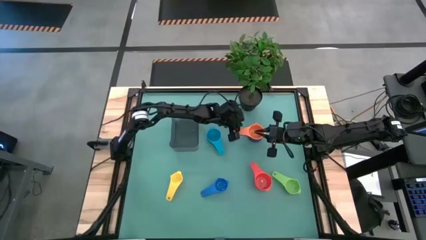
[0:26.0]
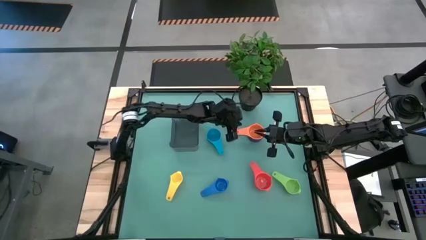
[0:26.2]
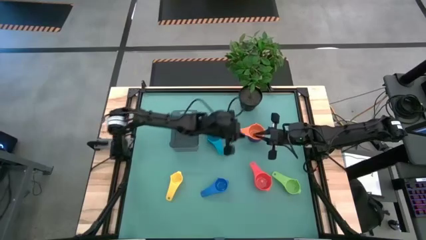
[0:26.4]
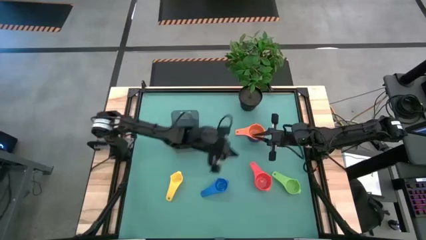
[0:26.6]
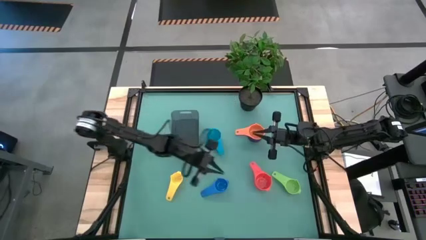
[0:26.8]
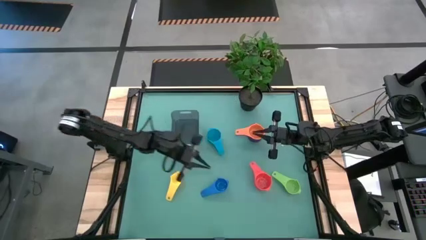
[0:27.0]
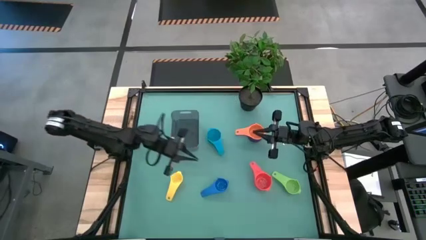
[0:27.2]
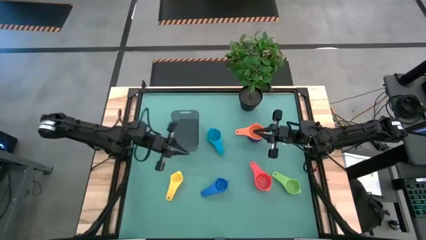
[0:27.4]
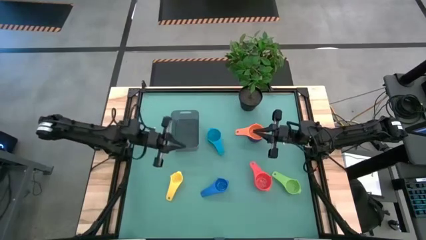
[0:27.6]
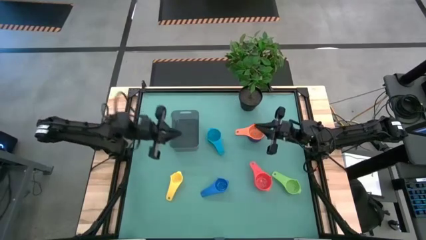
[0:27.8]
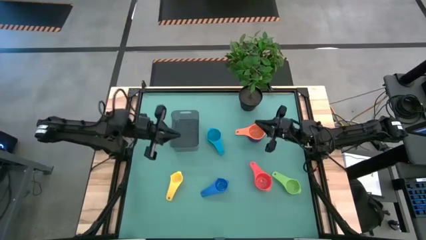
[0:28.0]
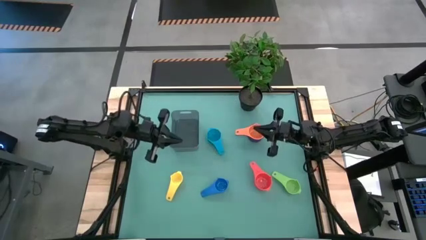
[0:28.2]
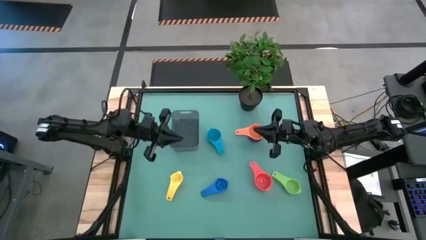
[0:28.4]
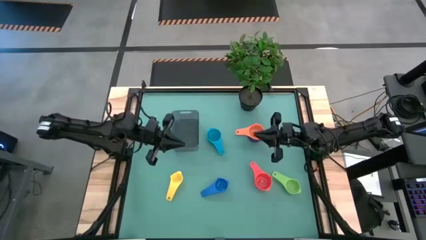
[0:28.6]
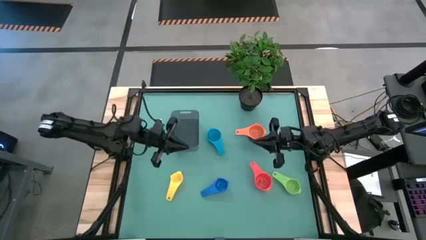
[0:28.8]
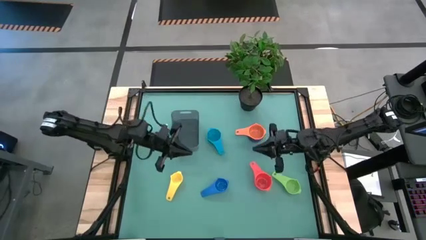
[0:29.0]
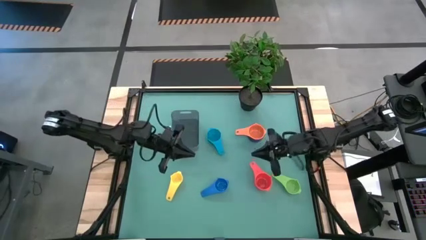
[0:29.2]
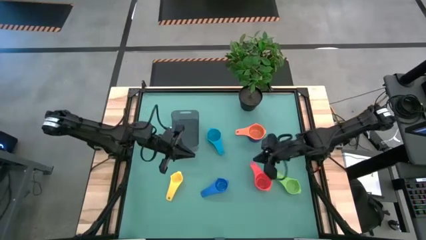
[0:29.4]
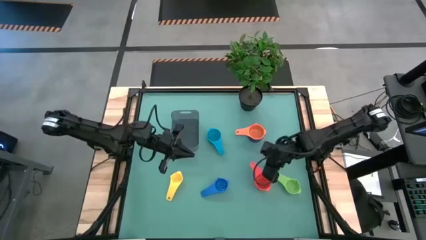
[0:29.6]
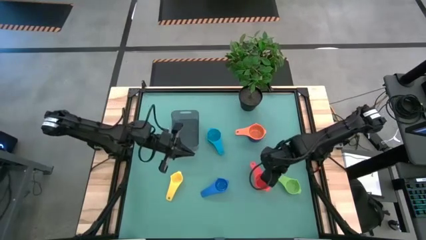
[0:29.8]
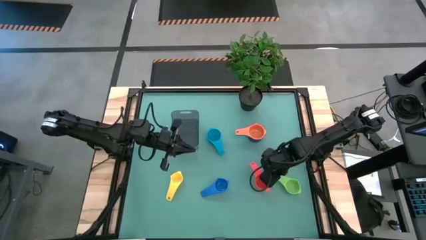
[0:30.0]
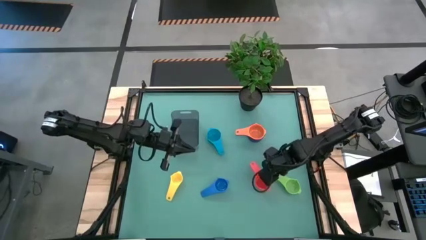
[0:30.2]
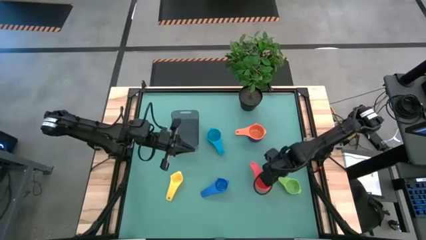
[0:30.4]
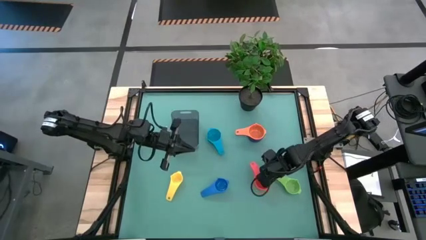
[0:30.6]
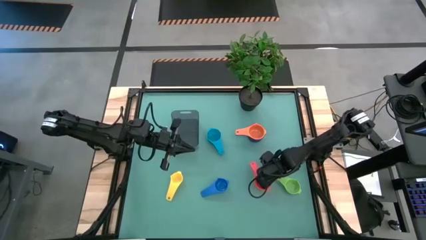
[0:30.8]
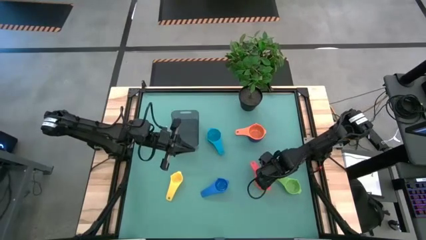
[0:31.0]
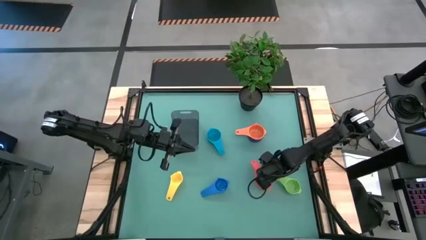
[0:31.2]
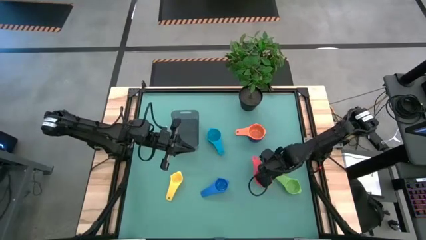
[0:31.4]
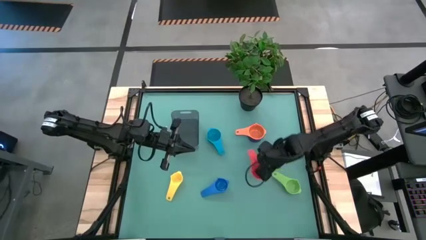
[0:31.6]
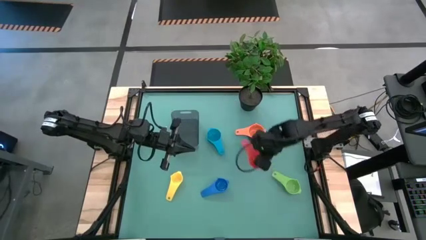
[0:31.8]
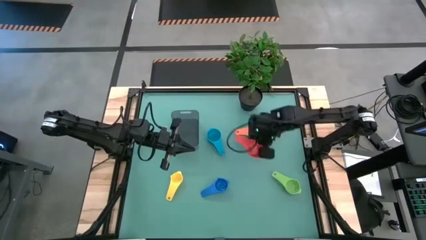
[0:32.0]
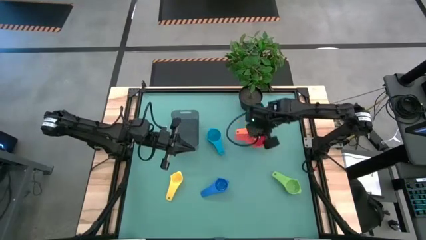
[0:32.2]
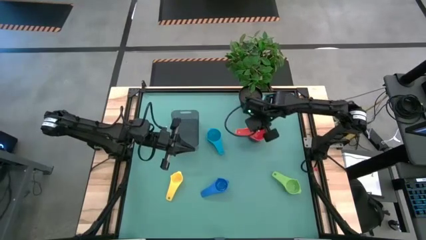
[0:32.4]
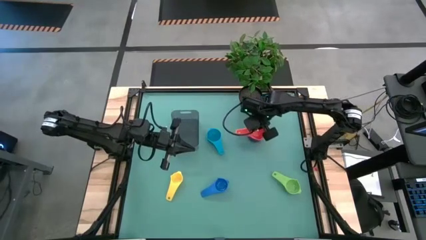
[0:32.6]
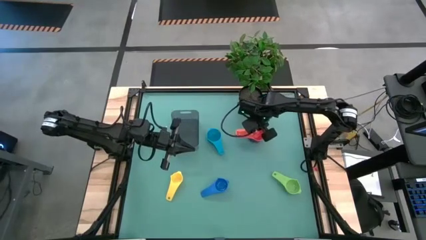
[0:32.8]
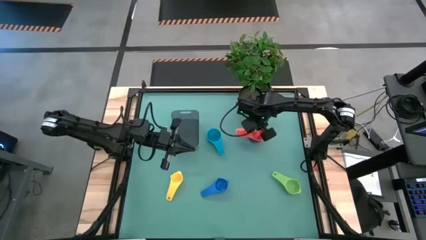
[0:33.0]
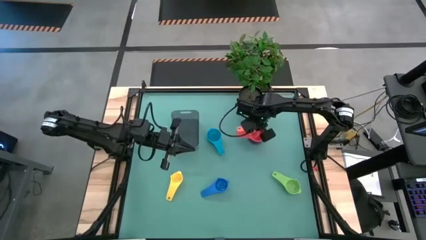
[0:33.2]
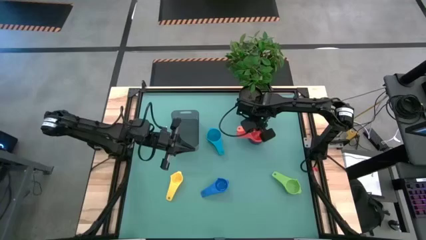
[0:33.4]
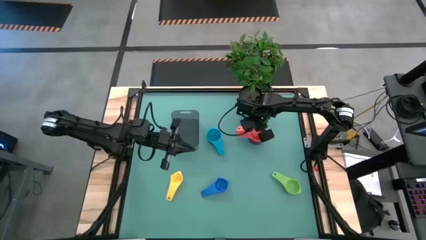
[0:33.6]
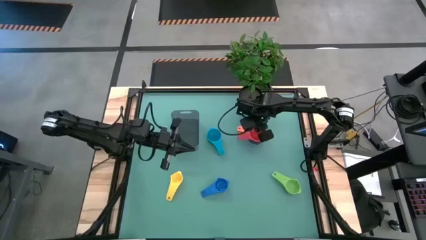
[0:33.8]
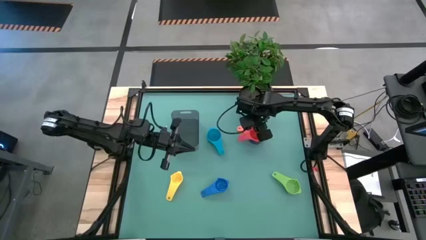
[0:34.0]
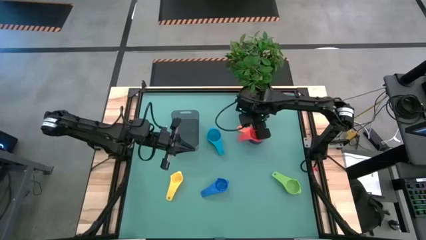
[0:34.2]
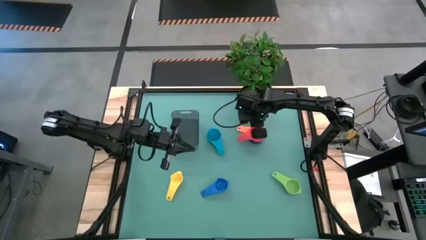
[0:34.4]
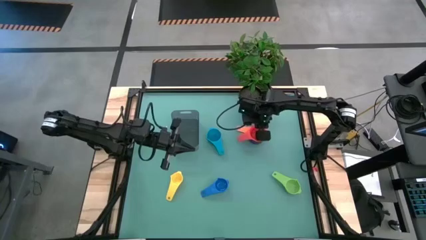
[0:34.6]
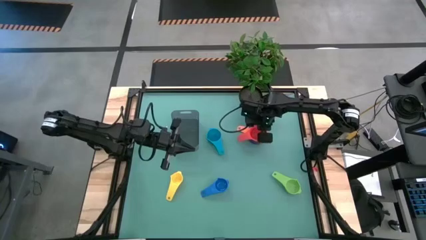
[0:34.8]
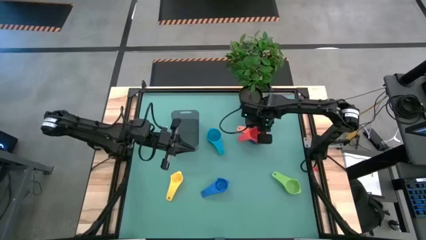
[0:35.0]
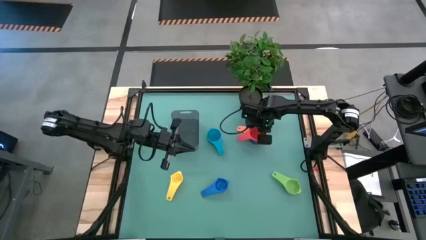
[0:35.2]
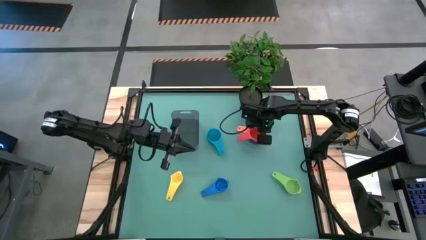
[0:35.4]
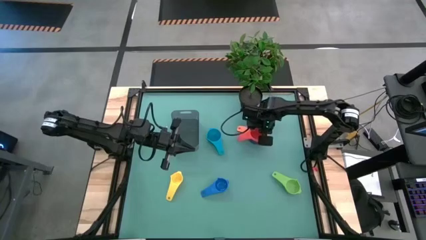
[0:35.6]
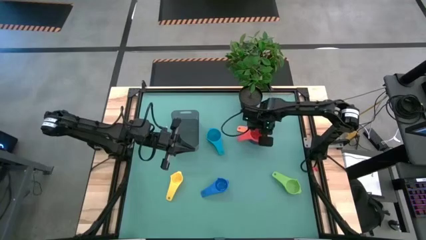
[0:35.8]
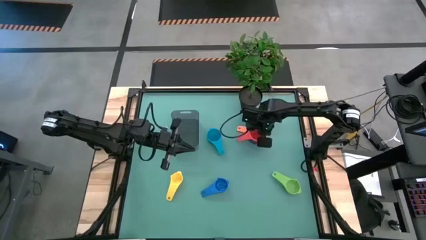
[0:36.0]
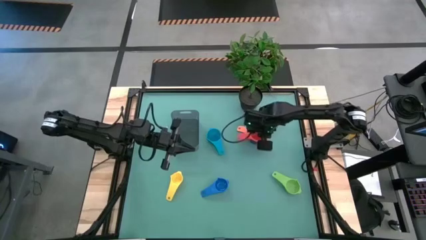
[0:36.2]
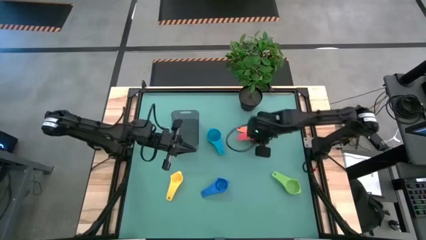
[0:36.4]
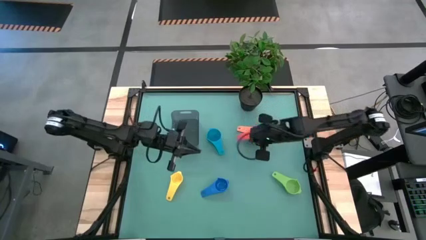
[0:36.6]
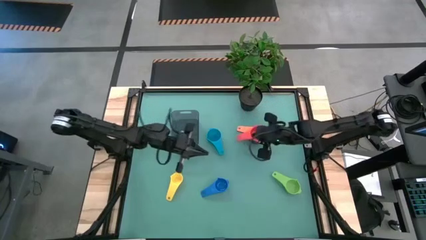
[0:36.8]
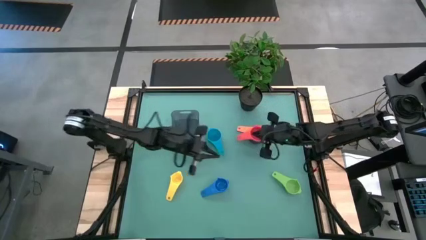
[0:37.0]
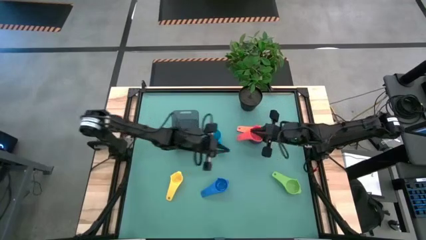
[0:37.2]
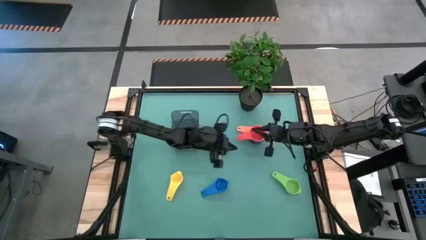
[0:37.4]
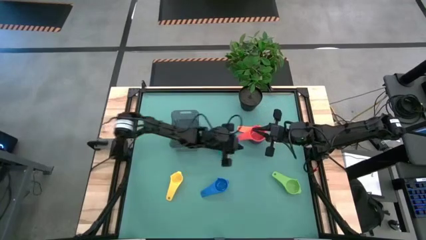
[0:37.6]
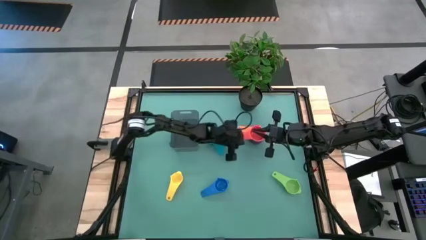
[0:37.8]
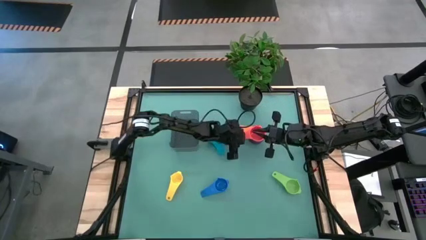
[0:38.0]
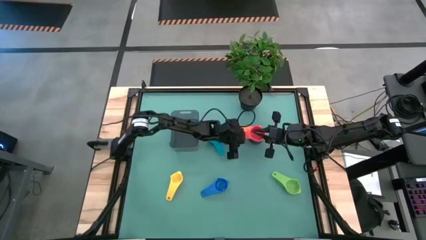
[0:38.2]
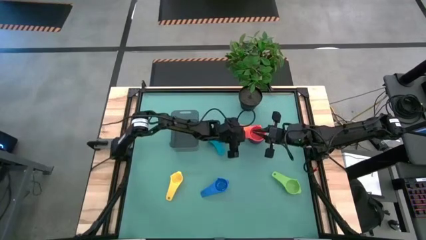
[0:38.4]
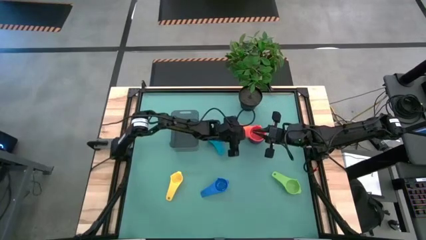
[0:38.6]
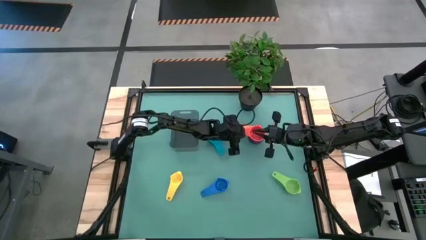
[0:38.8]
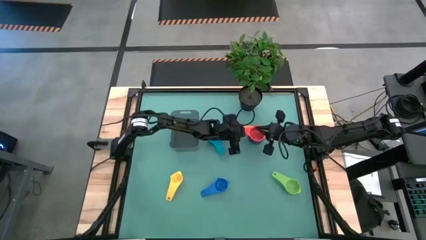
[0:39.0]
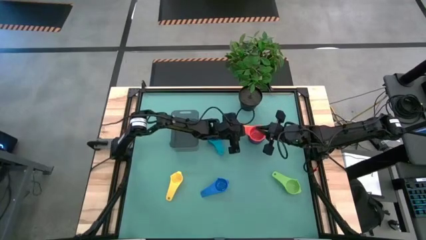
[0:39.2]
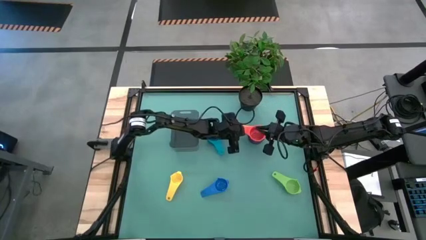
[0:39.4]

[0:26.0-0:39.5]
Task: Nest measuring cups in basket
Stack the red measuring cup on top of the orange measuring cup
